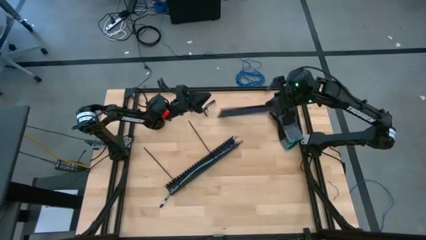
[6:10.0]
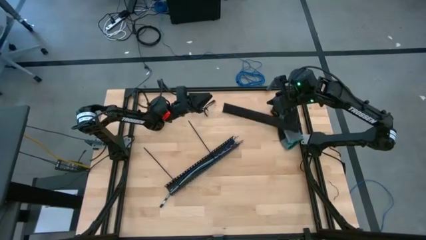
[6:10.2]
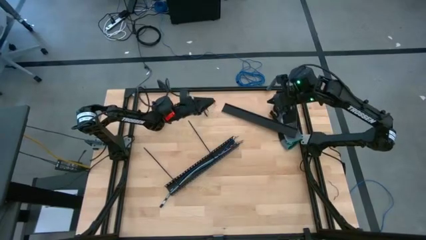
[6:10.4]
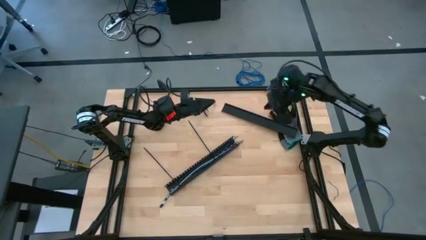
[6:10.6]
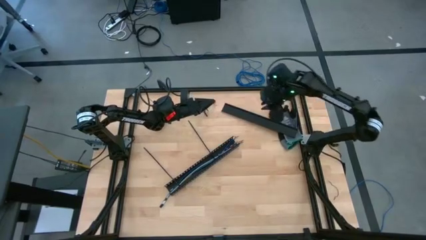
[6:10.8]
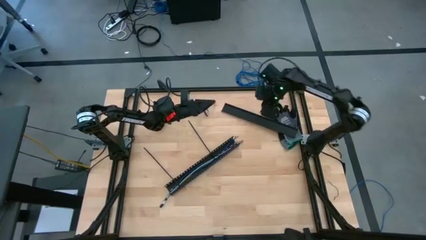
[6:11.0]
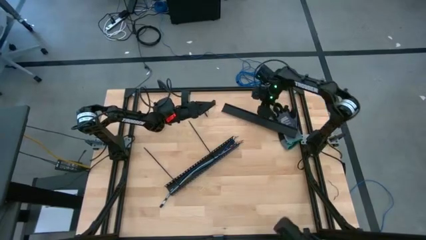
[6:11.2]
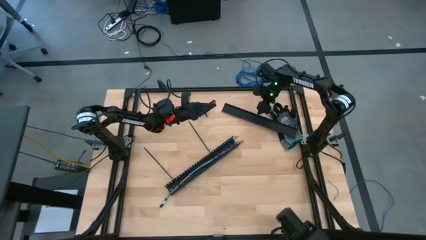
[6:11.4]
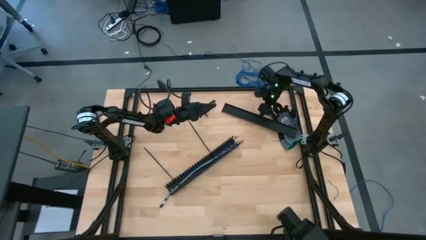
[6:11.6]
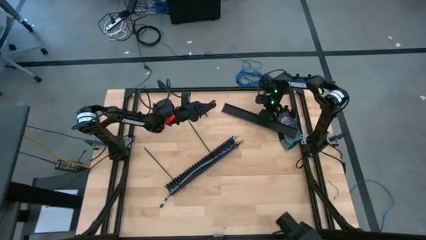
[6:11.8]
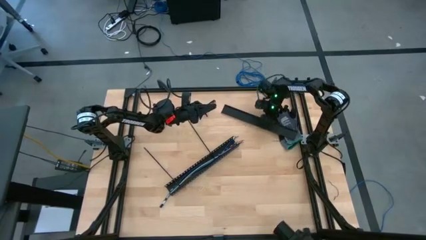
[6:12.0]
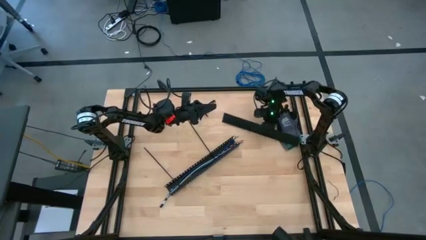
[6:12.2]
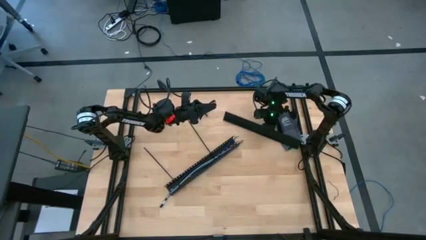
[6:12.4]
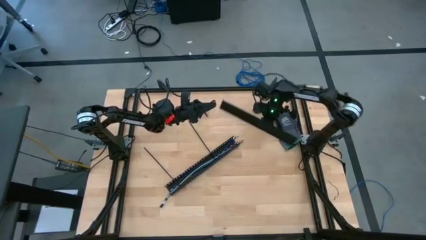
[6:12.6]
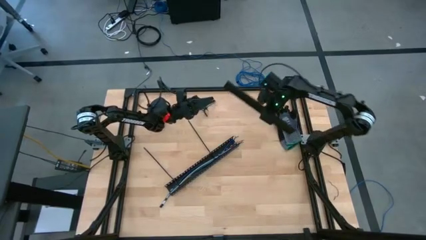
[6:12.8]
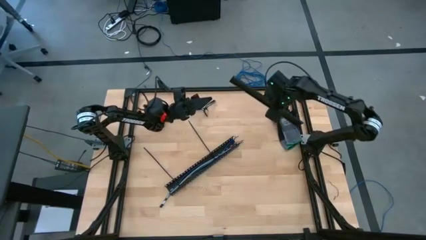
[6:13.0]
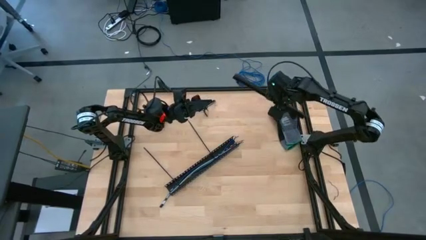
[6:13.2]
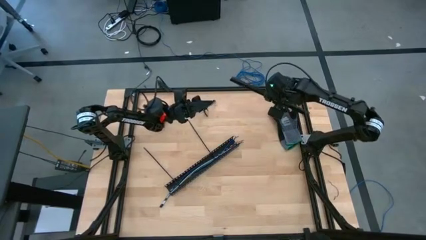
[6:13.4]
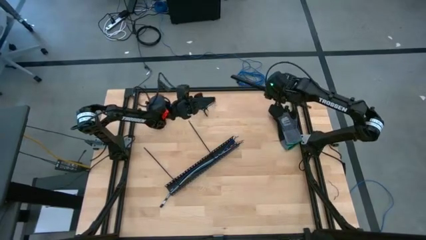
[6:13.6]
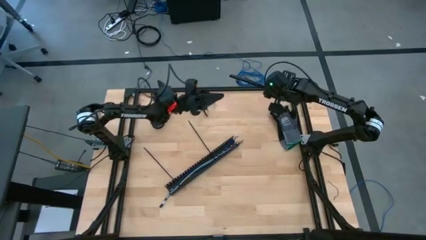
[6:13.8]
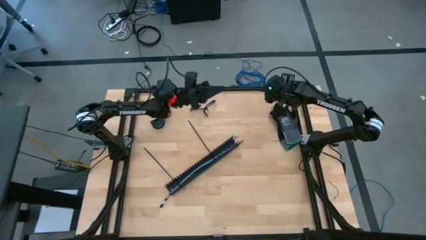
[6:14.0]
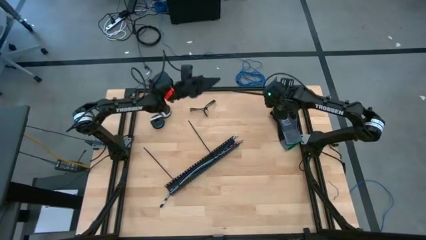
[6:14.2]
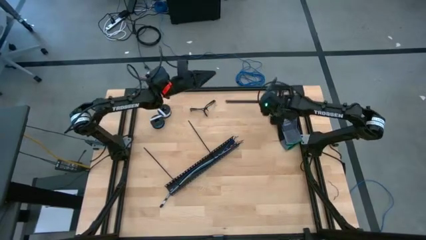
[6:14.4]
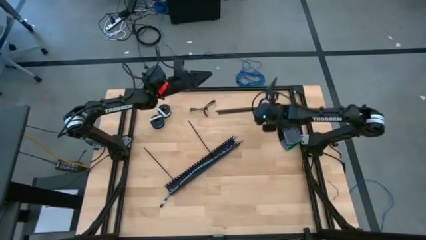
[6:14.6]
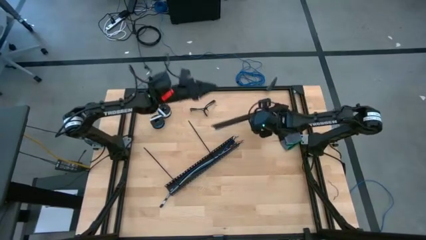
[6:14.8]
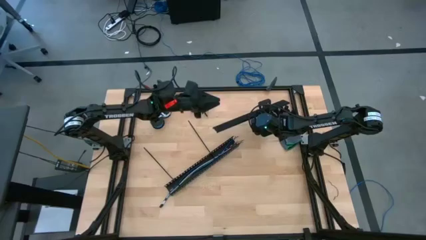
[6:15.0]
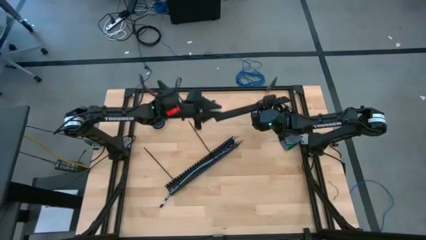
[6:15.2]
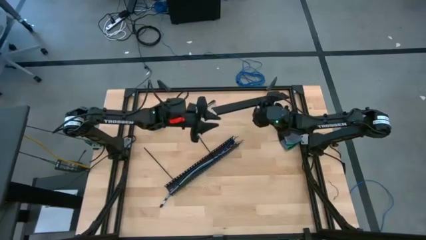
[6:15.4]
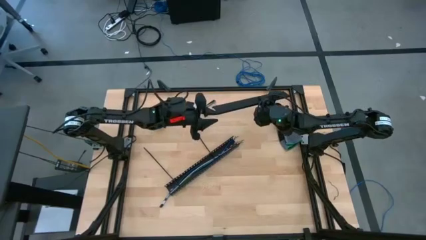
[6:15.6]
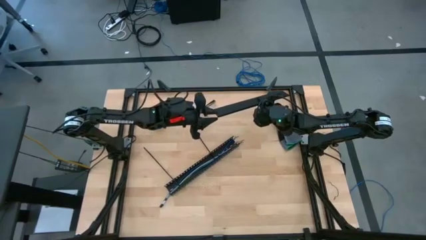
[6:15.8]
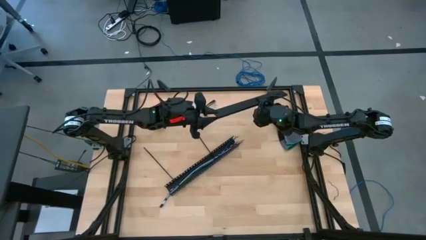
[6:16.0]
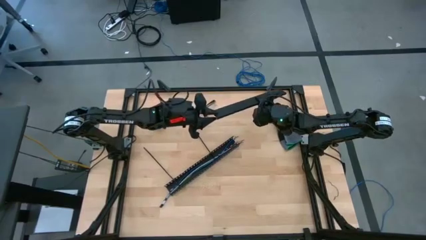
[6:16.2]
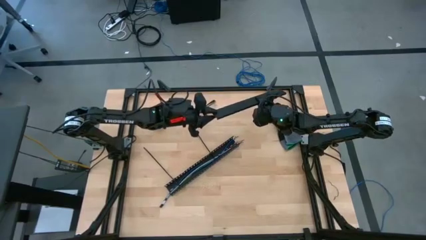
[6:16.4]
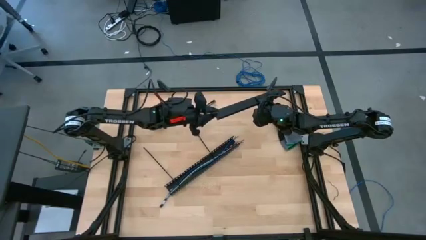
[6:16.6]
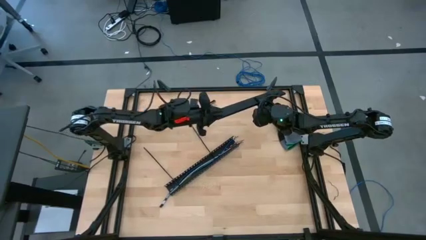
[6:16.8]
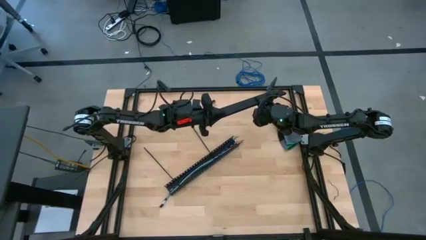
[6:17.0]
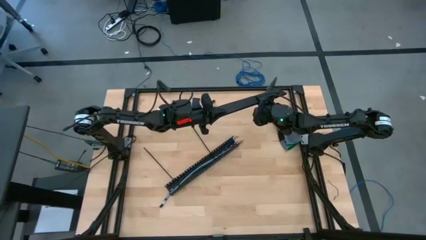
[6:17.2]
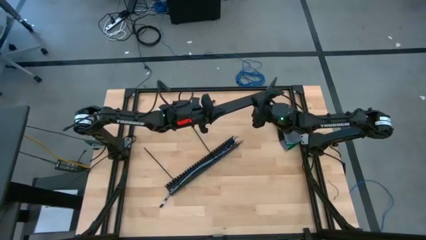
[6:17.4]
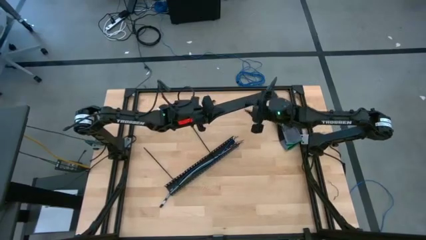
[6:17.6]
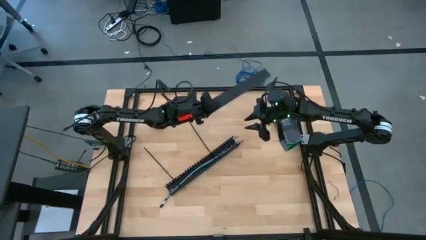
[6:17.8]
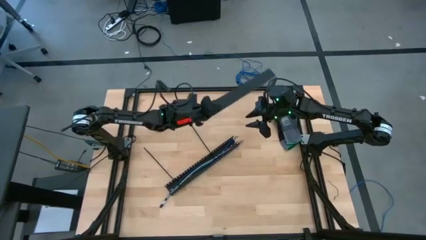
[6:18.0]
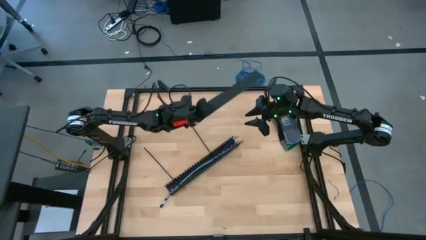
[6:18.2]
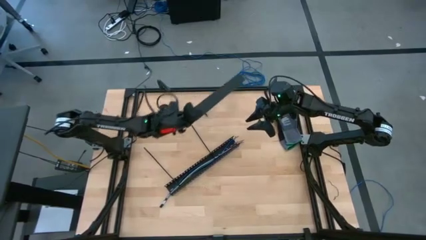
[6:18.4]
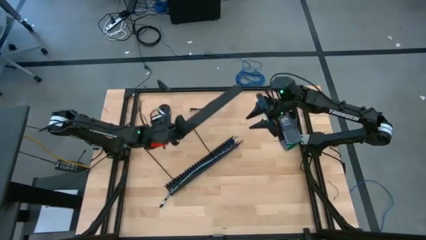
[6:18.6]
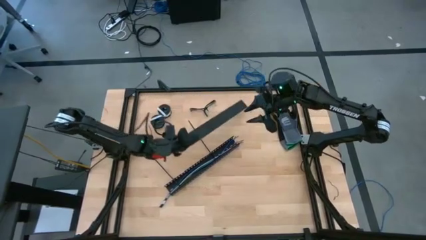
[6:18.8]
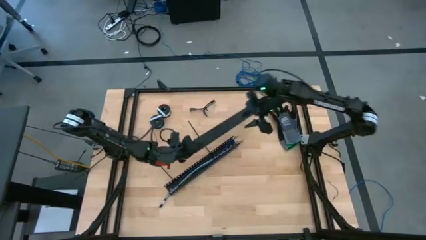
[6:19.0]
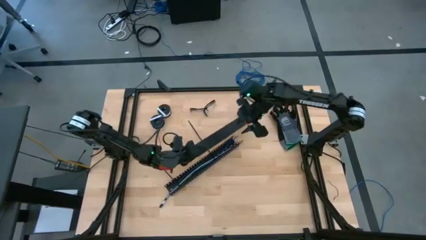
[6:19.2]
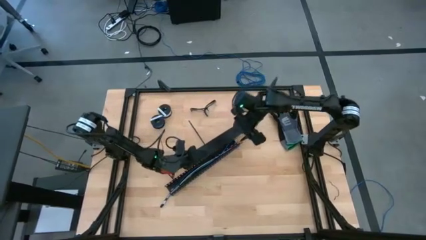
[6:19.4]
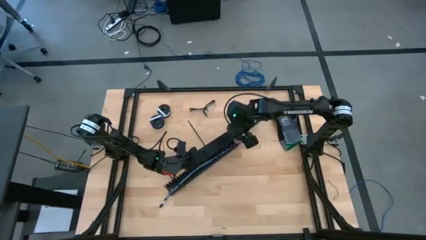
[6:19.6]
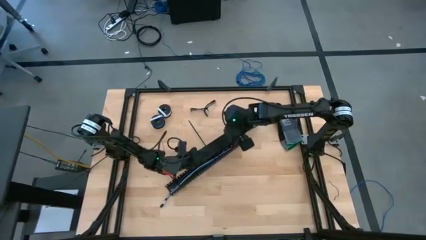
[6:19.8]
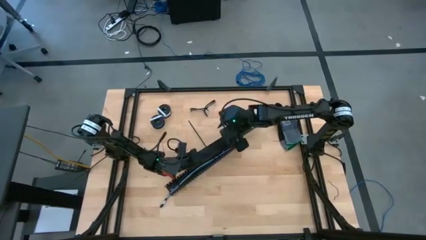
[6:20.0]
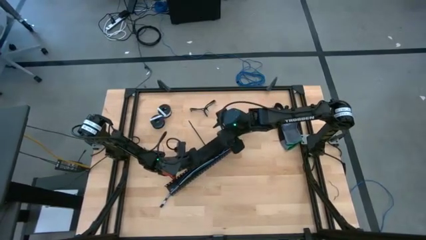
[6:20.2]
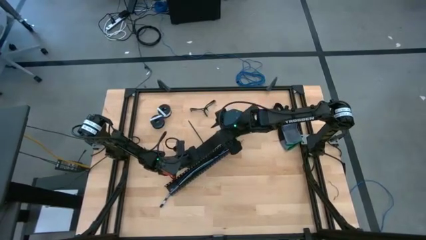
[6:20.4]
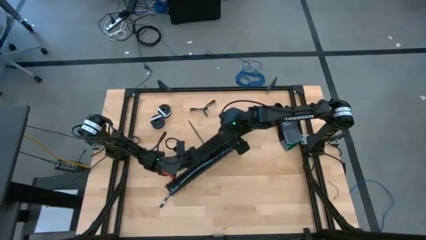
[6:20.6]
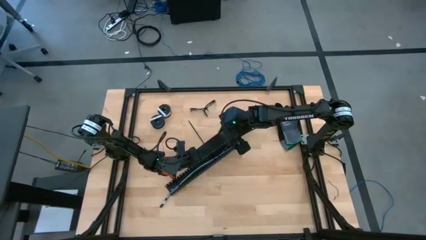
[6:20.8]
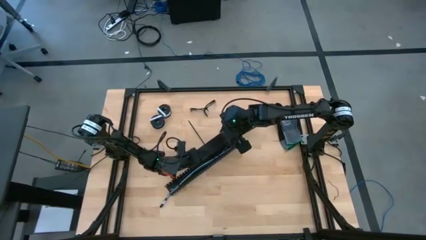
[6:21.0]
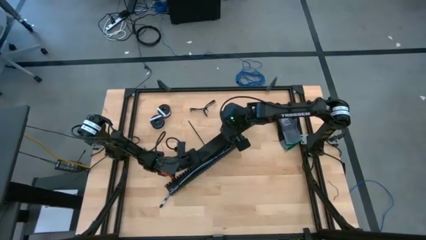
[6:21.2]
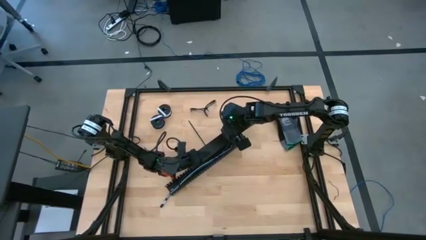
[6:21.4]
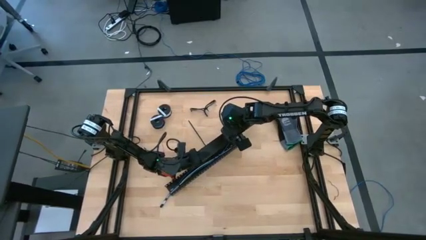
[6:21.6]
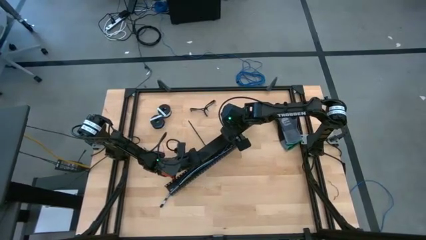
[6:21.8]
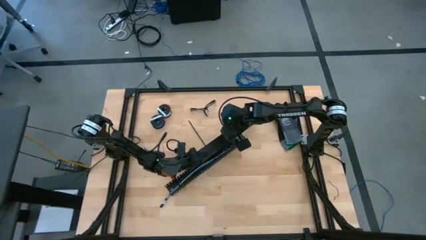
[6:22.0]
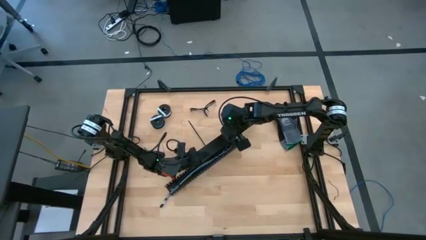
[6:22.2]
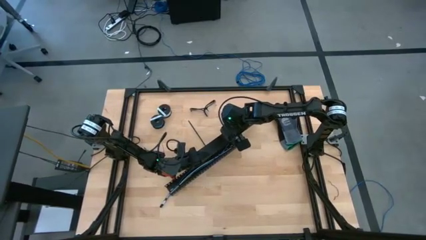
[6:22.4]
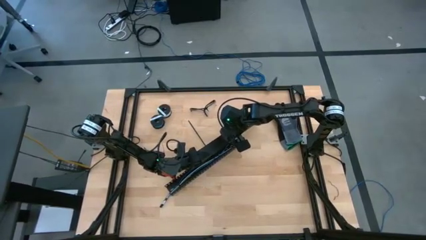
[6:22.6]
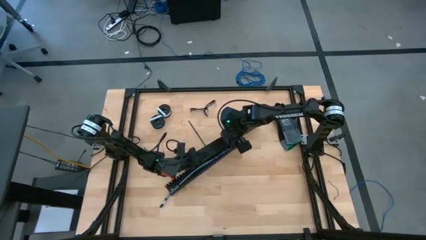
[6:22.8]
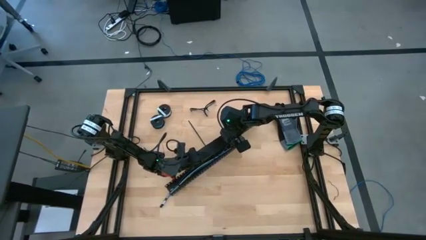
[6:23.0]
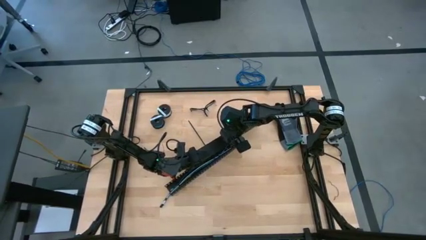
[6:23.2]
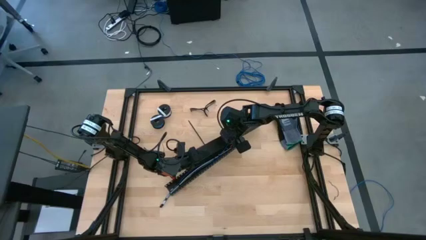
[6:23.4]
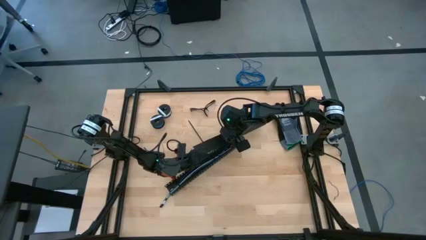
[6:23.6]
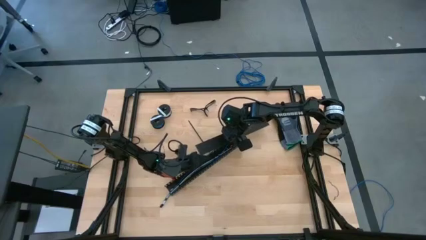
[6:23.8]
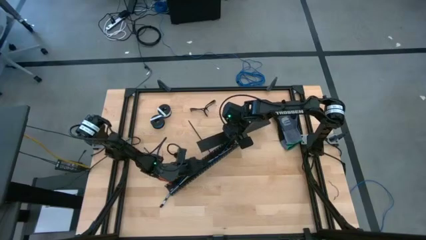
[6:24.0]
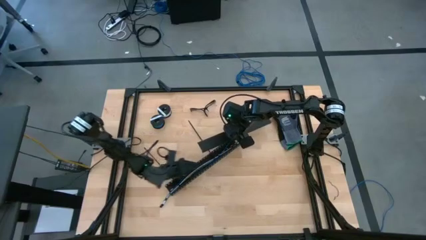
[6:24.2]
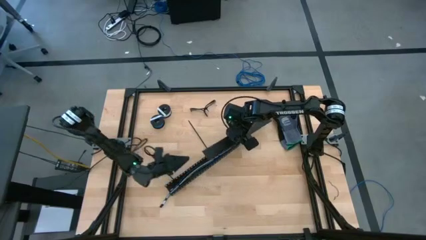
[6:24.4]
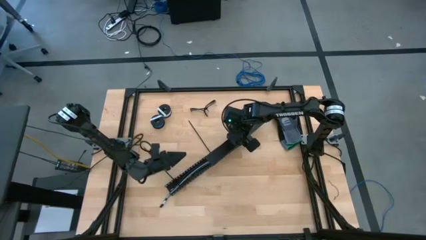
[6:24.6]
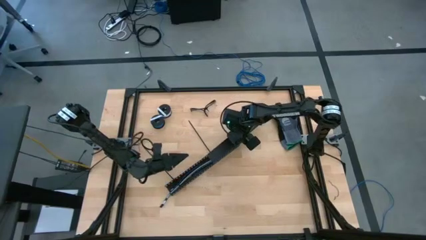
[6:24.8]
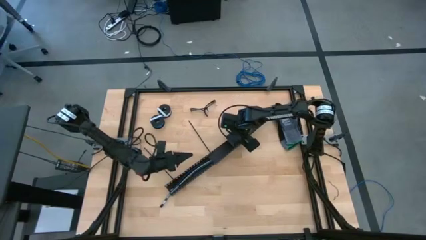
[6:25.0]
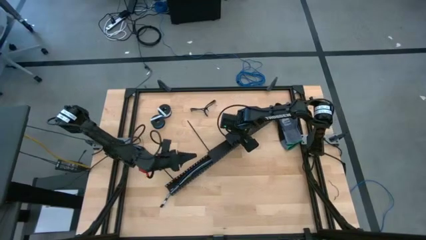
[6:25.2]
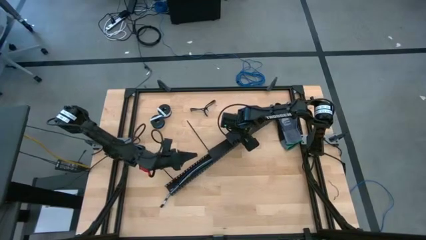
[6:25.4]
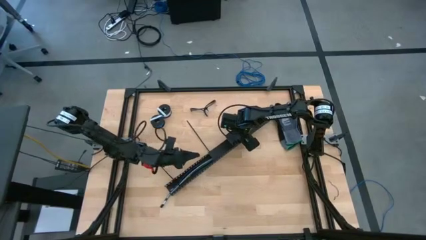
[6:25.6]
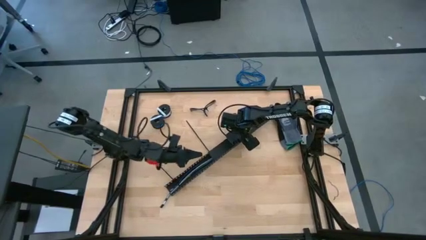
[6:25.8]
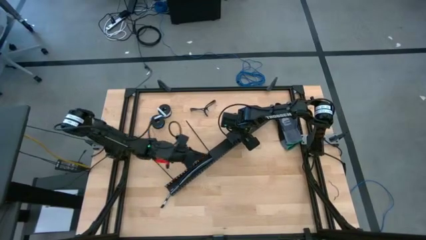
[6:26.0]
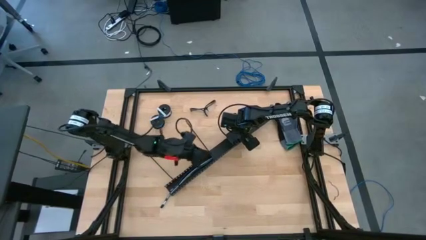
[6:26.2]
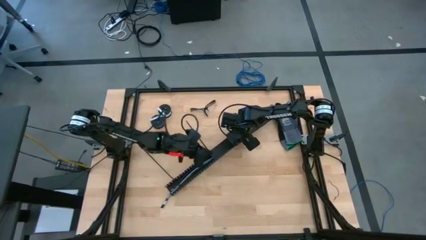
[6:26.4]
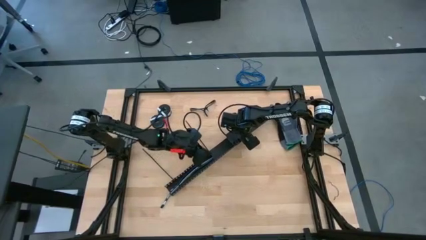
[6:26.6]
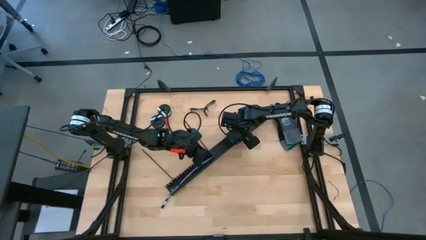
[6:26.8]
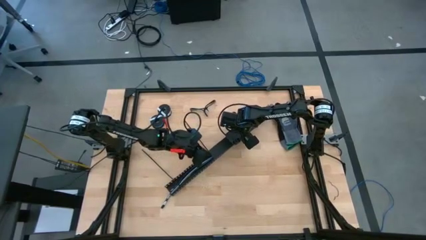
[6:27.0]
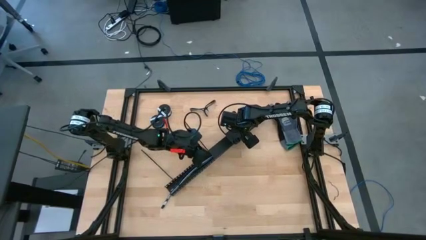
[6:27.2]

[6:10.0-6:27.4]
Task: Ziptie cables
Insert the black cover of the black cable duct
